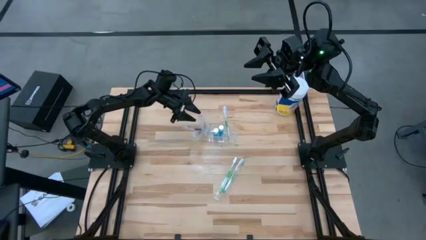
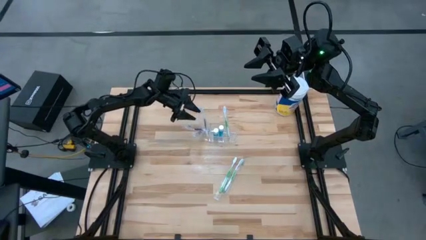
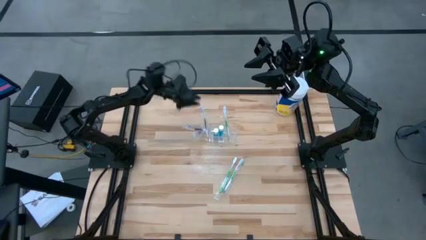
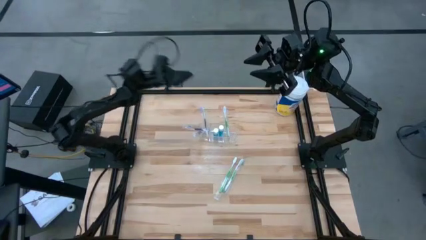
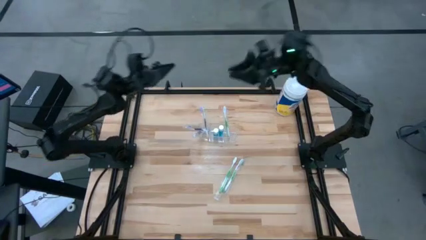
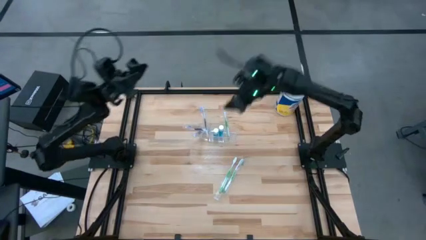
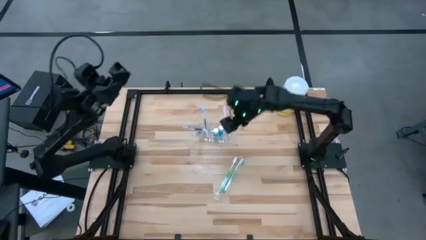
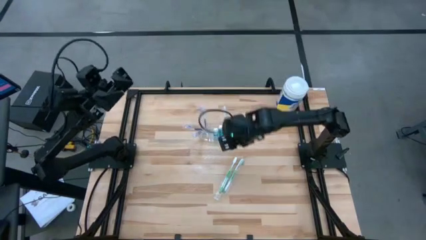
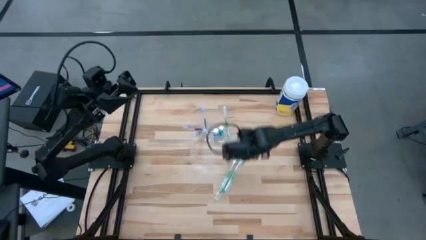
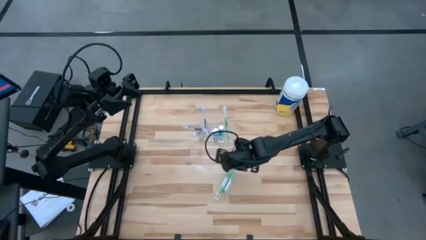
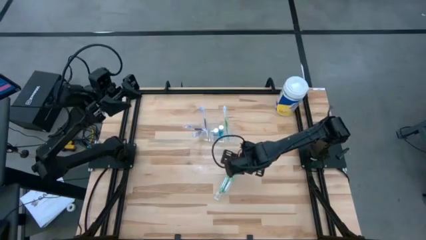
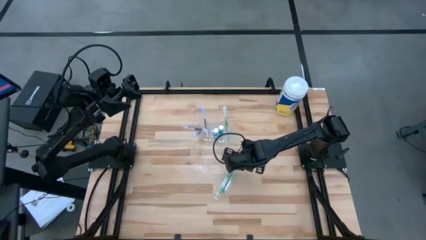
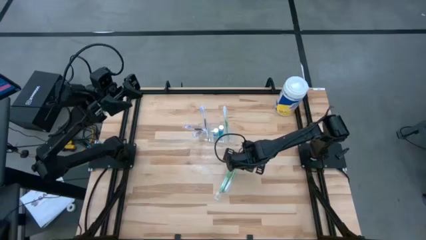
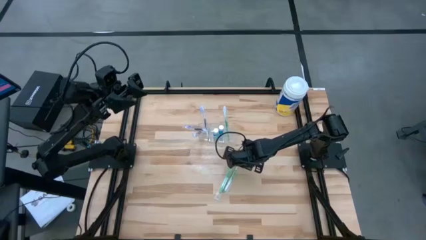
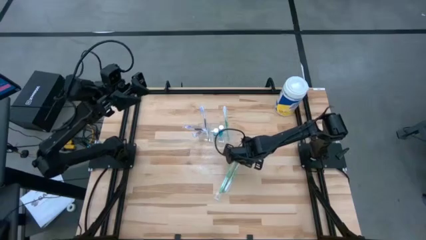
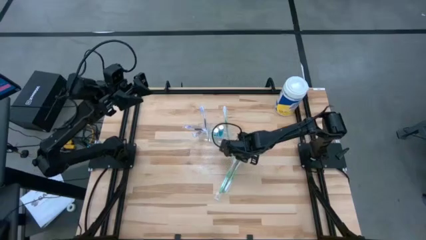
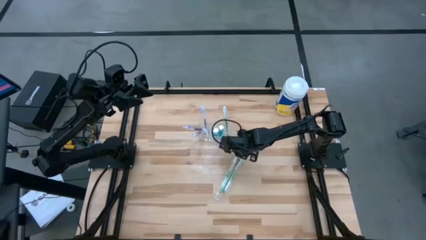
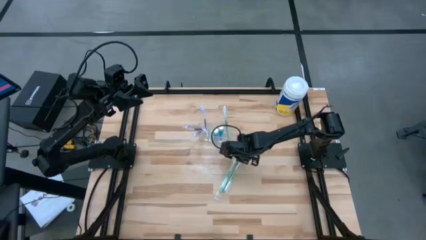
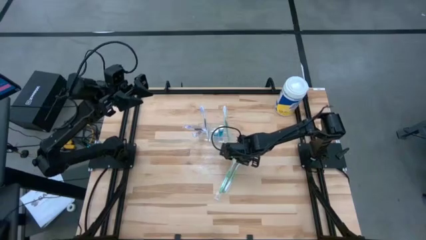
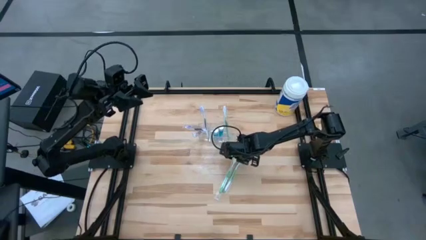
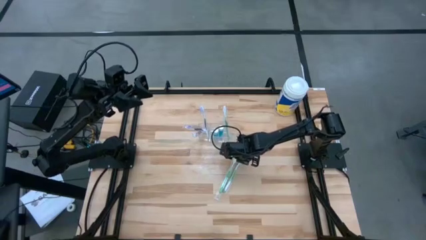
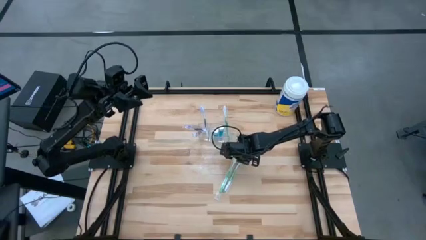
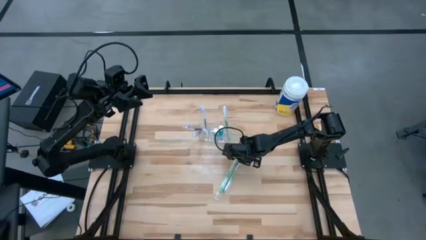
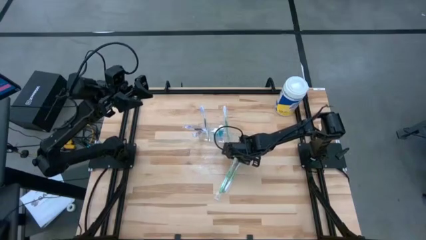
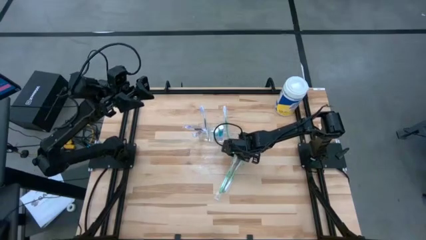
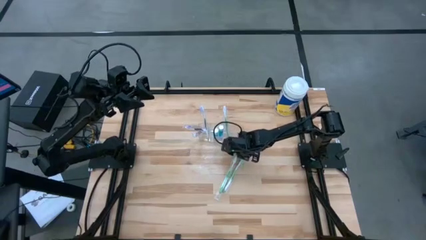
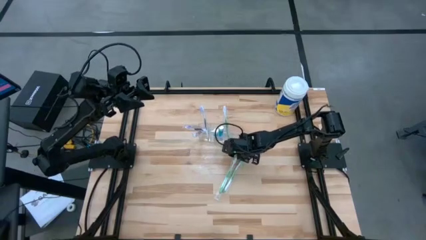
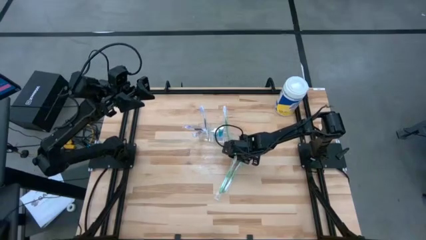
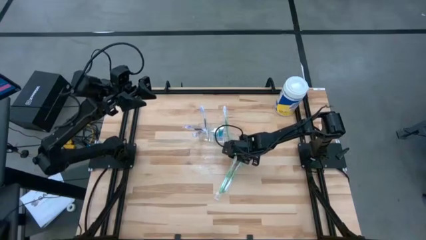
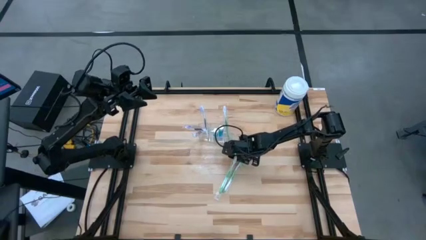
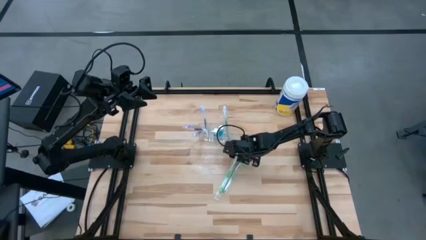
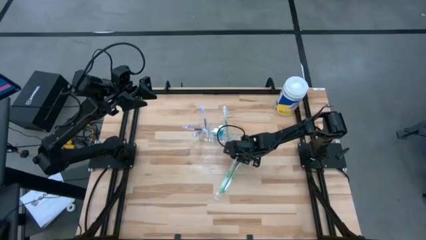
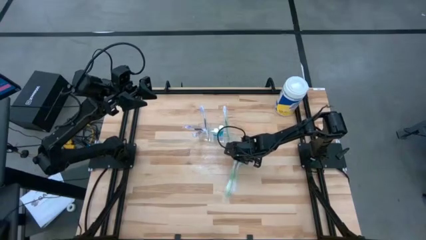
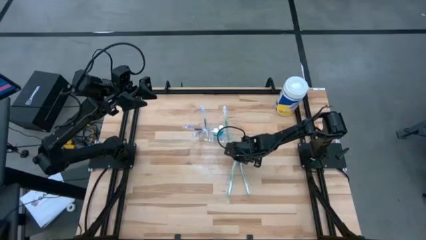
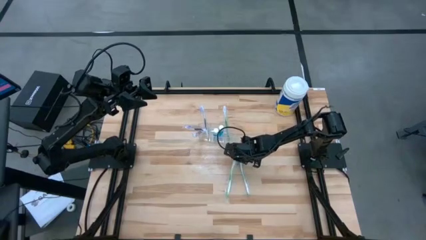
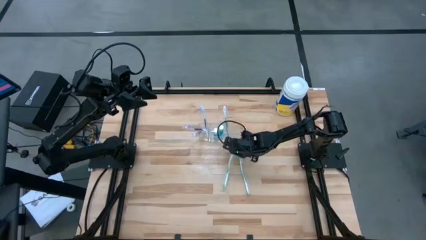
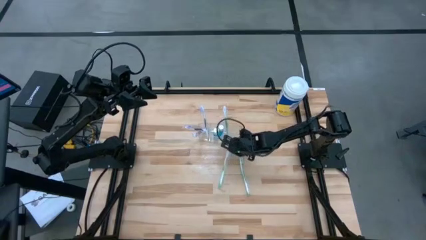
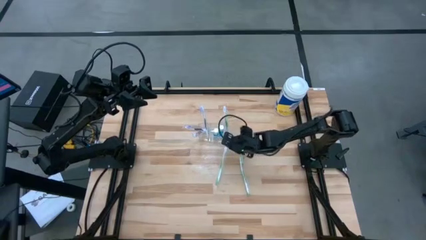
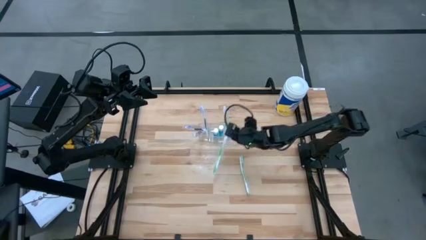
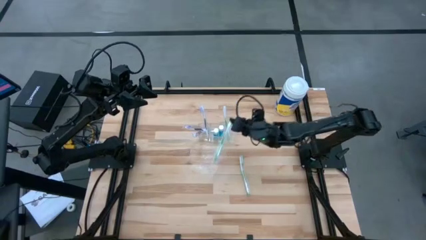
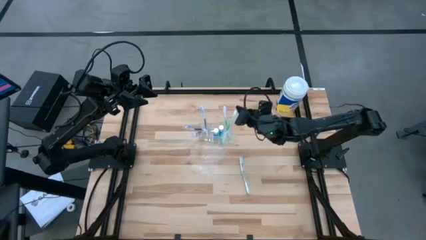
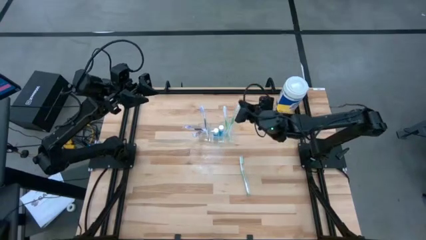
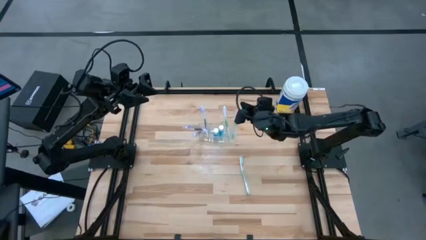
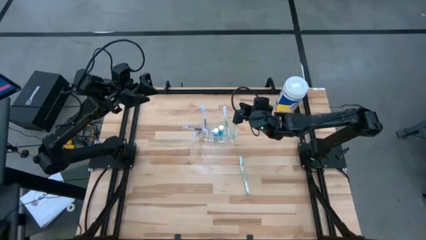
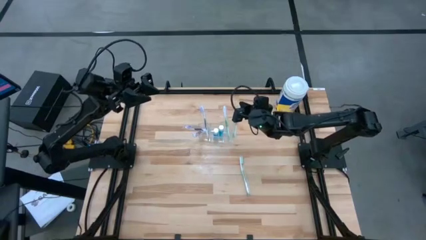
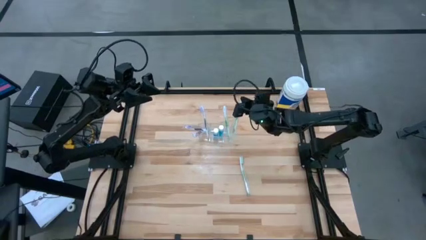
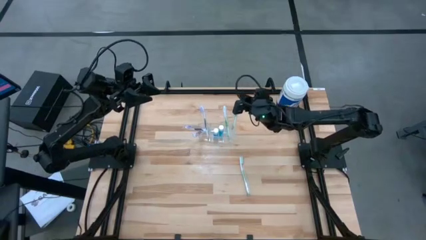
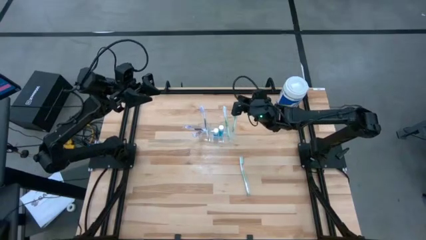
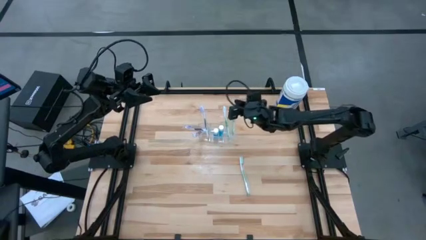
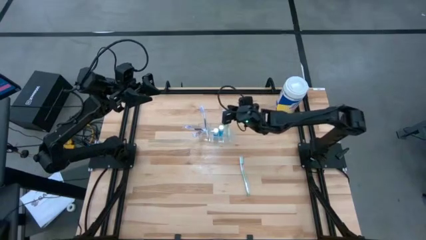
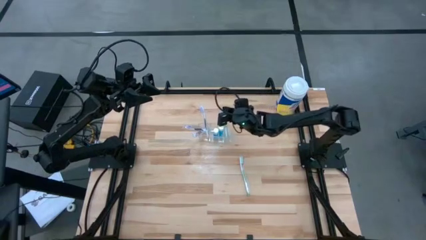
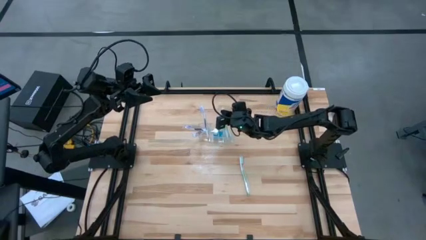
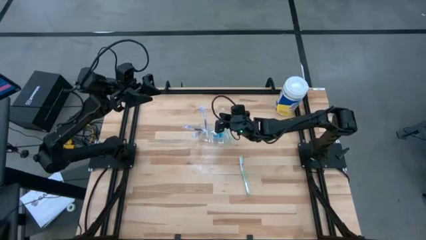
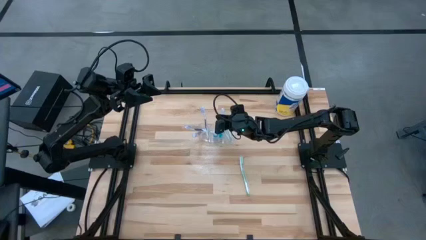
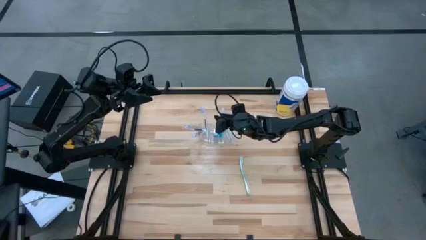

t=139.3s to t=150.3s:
Task: Pick & Place toothbrushing station
Put the left green toothbrush into the transparent organizer

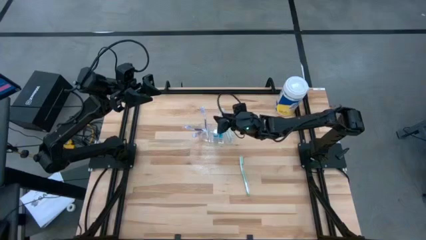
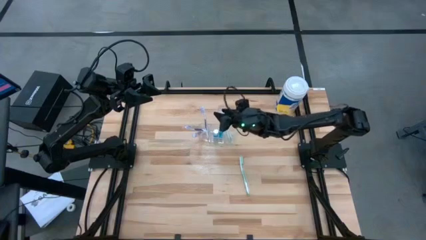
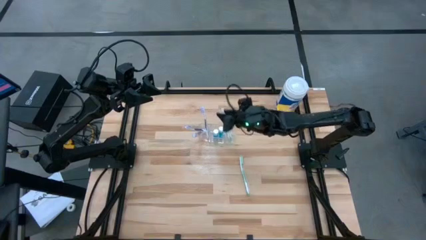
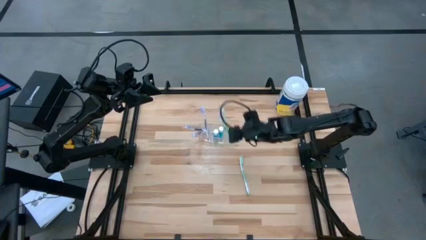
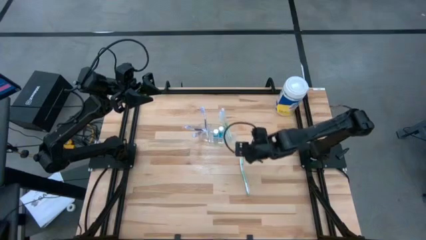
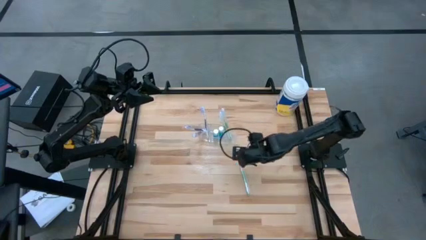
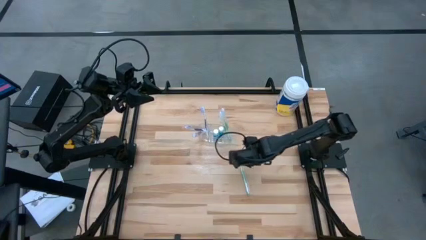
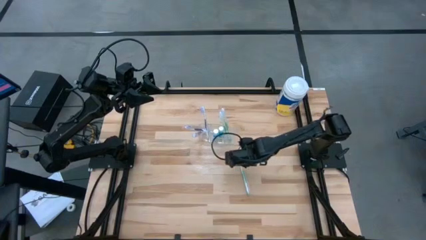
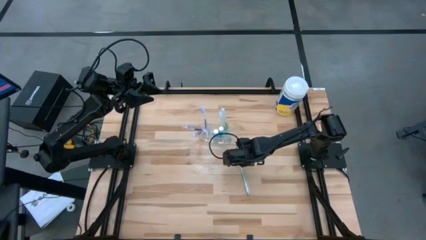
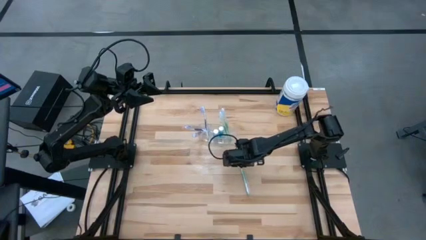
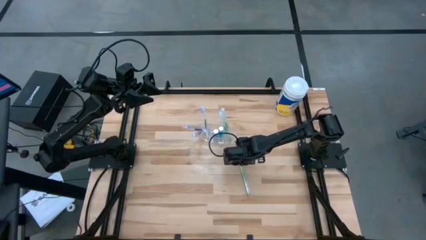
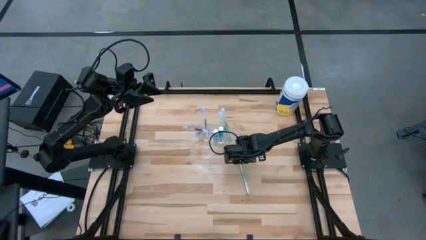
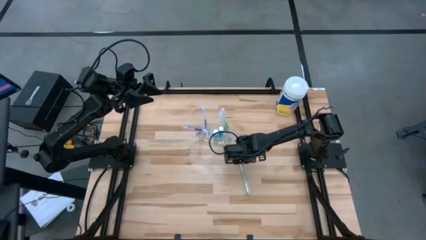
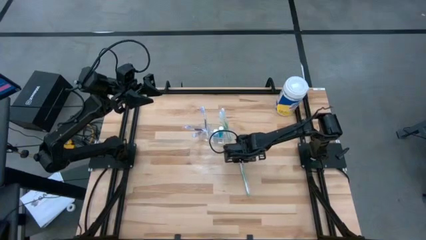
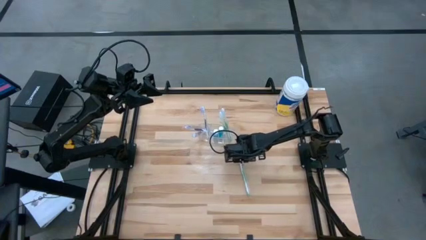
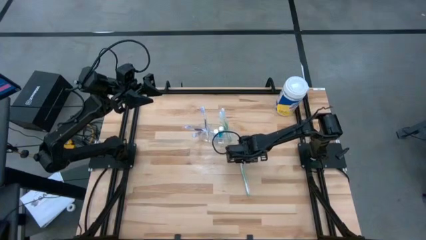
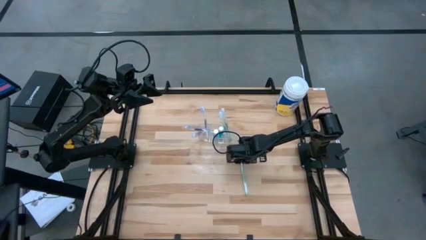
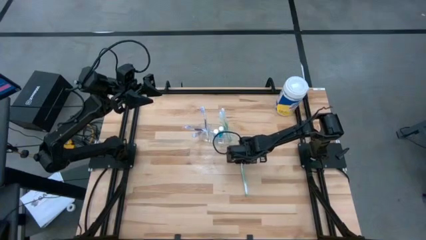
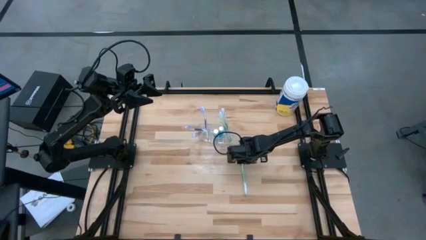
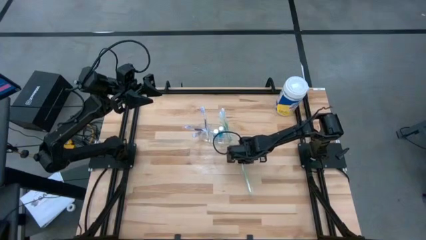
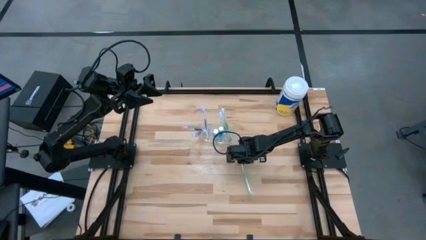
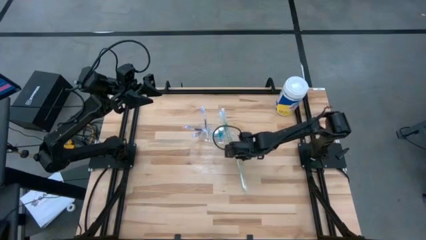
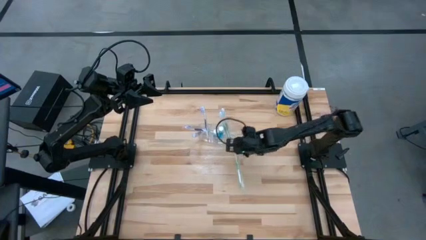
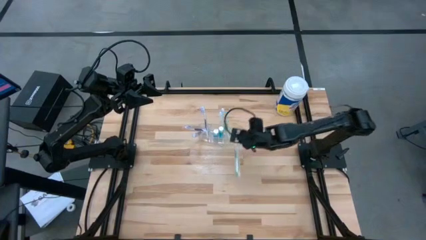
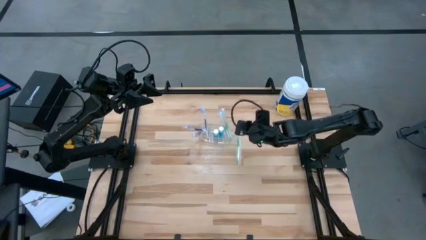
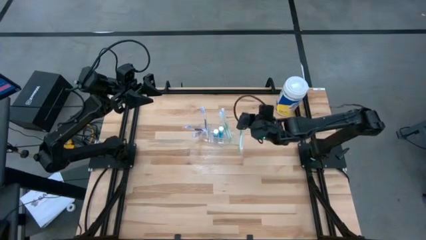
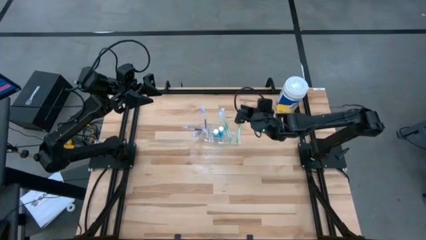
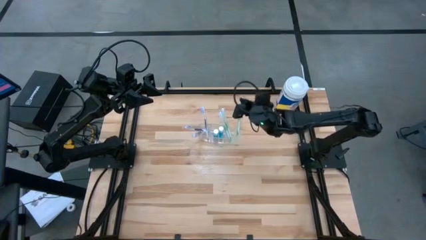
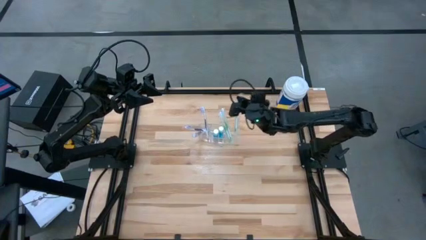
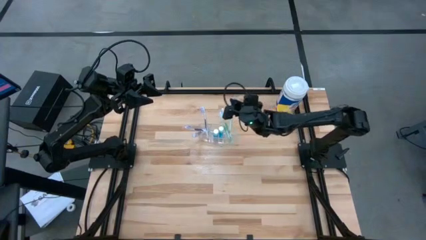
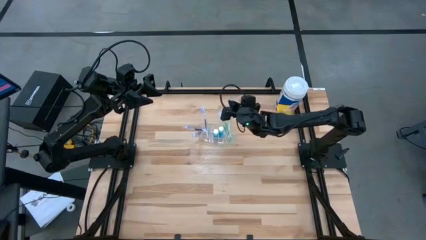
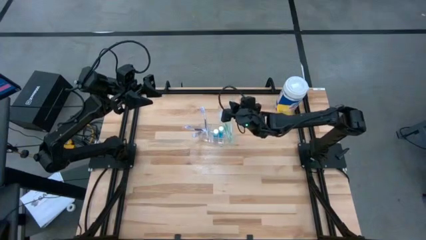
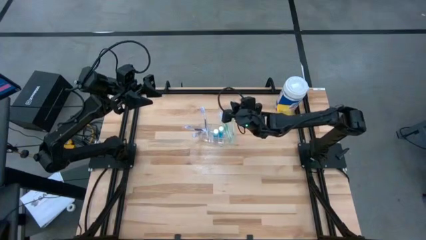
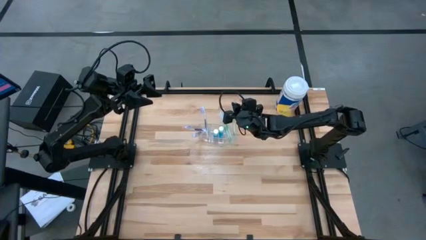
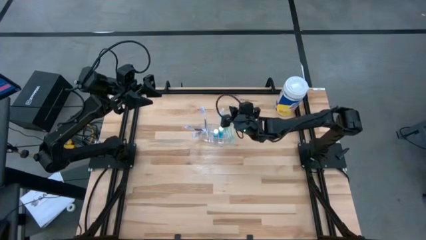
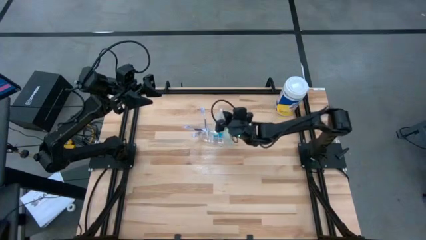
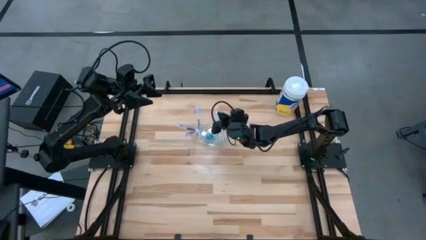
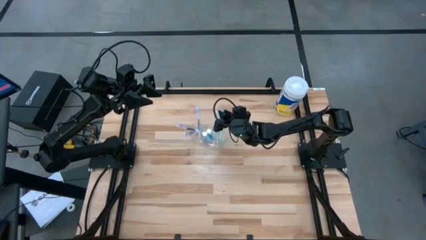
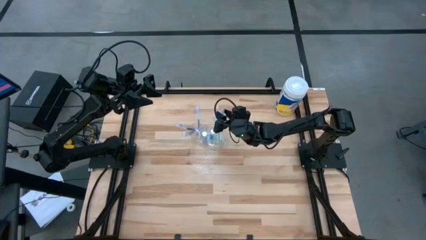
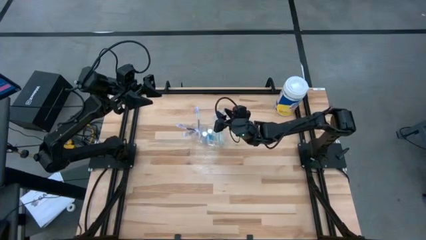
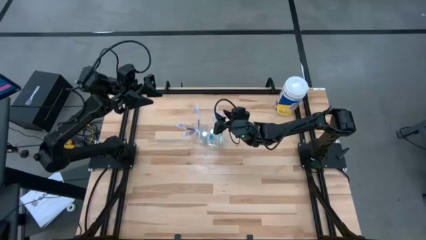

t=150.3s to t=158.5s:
Put the green toothbrush into the transparent organizer
